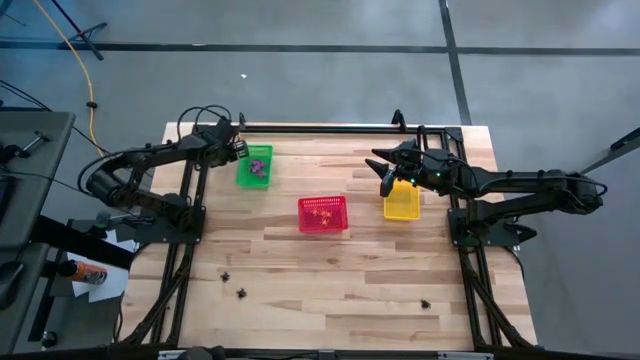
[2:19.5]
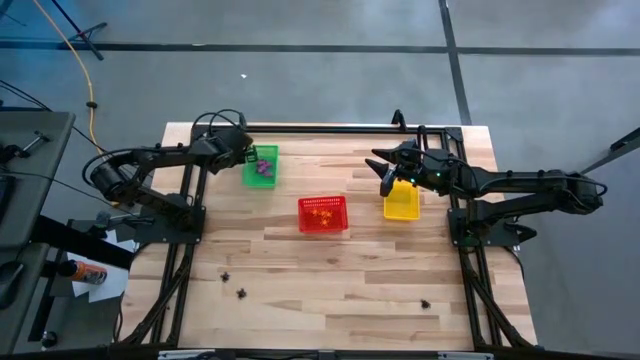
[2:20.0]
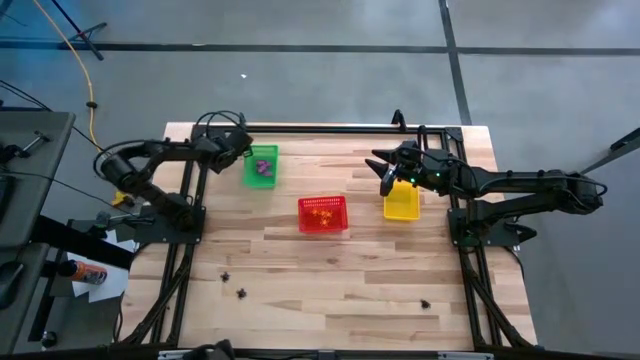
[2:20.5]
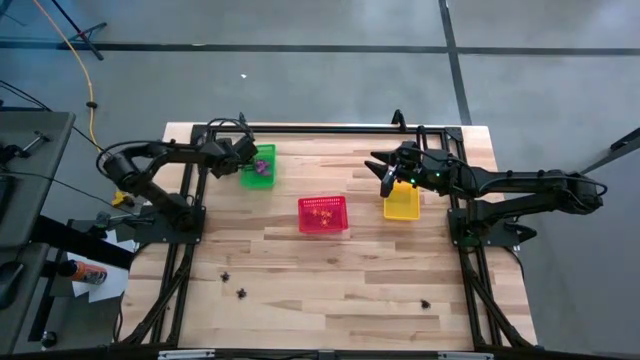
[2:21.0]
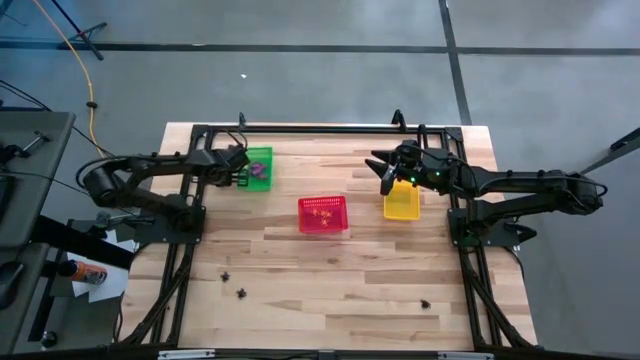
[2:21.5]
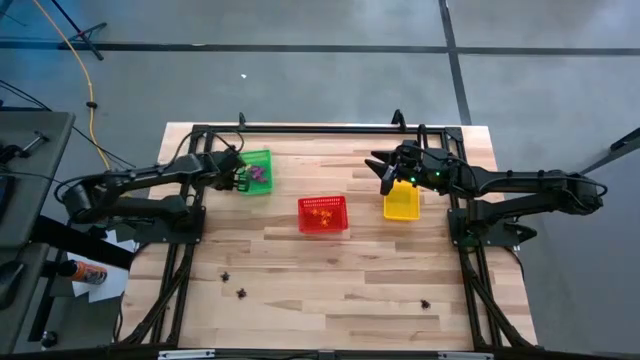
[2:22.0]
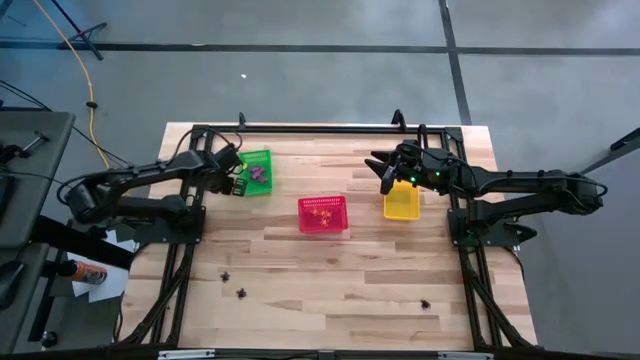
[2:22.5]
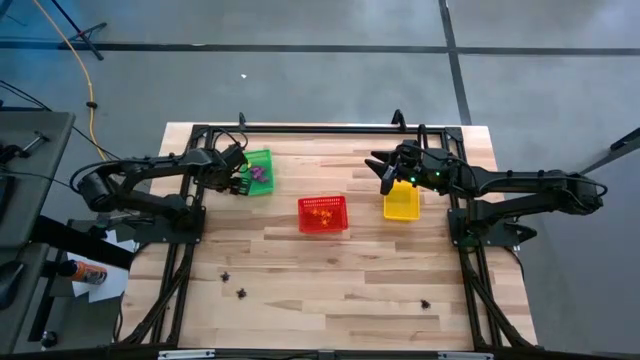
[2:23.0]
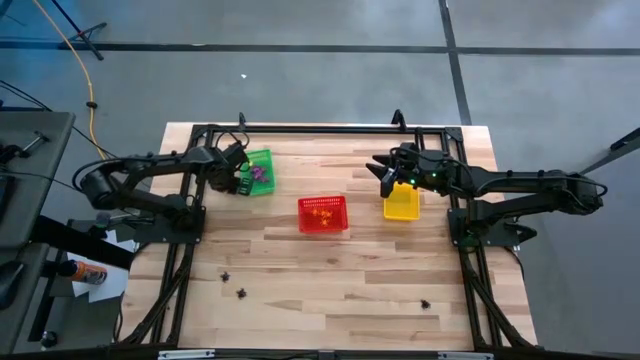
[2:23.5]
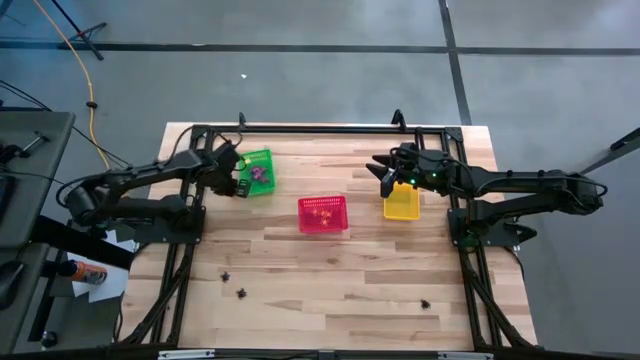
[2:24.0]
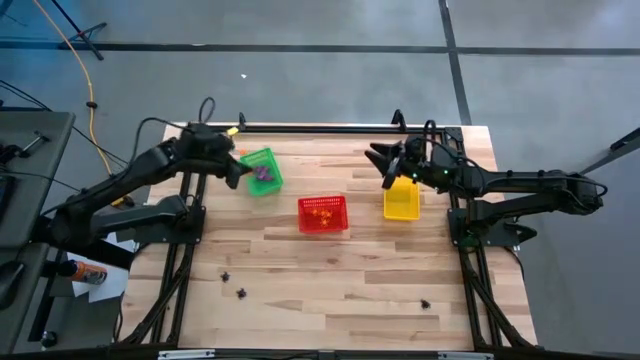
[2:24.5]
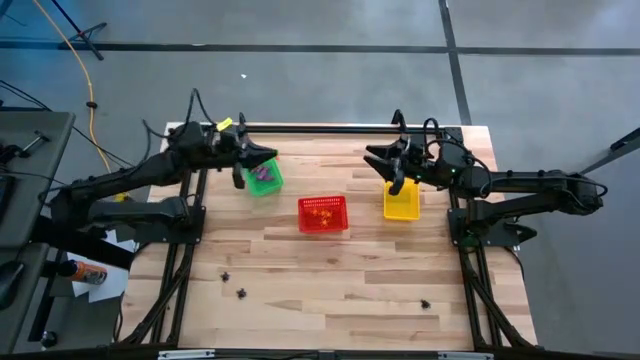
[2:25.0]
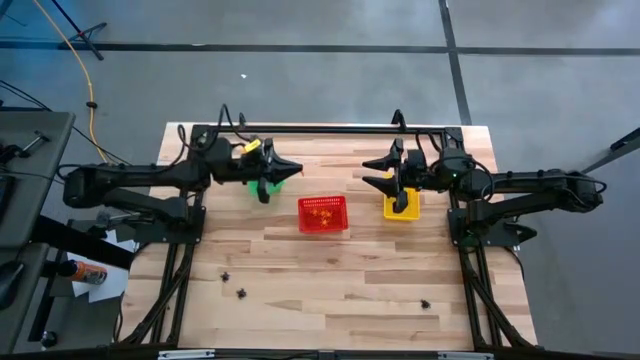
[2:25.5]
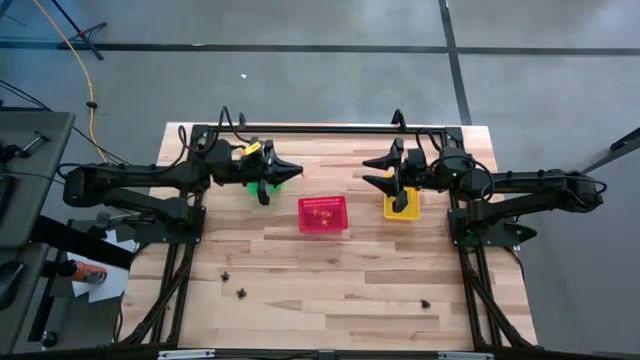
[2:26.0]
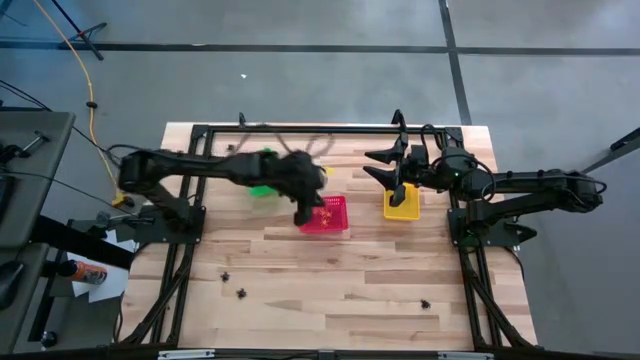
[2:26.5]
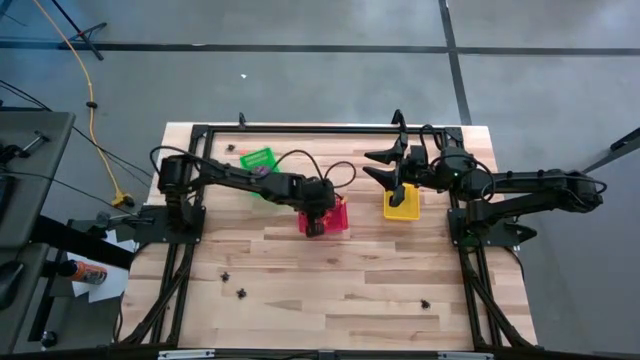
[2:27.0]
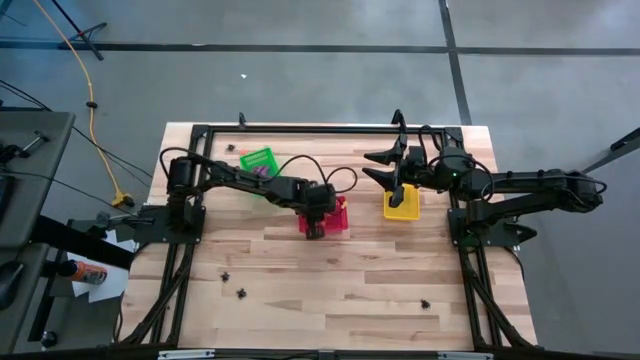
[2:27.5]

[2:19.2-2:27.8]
Task: Sort Halloween decoration
Put the orange spider toy into the red bin

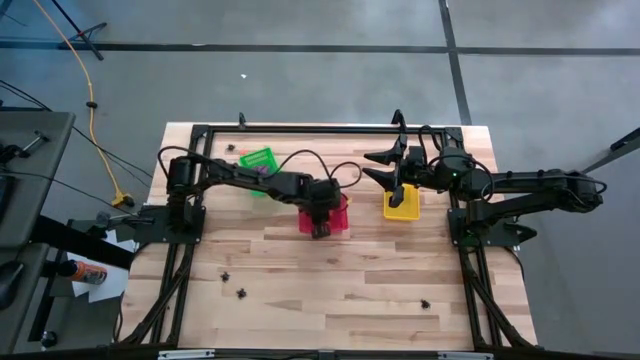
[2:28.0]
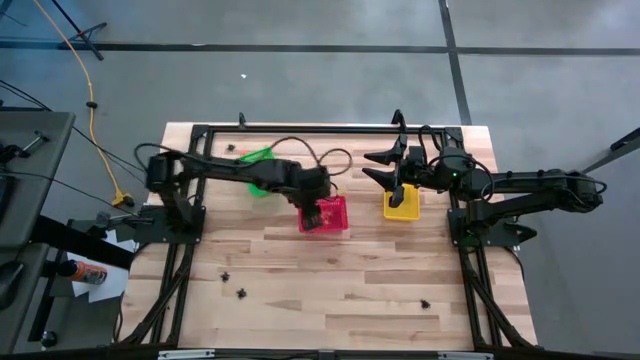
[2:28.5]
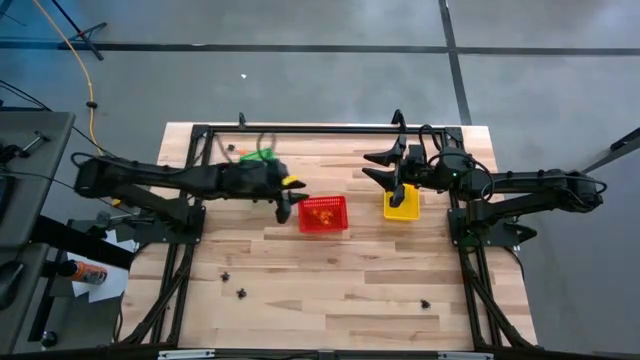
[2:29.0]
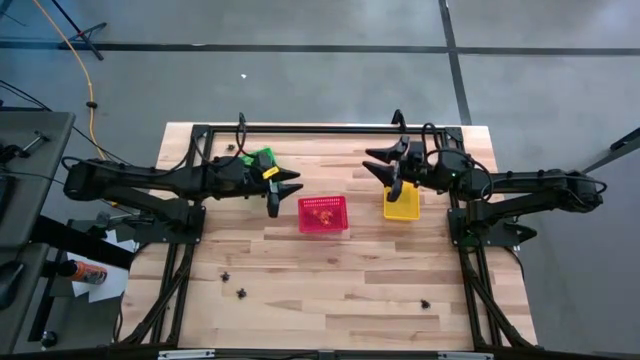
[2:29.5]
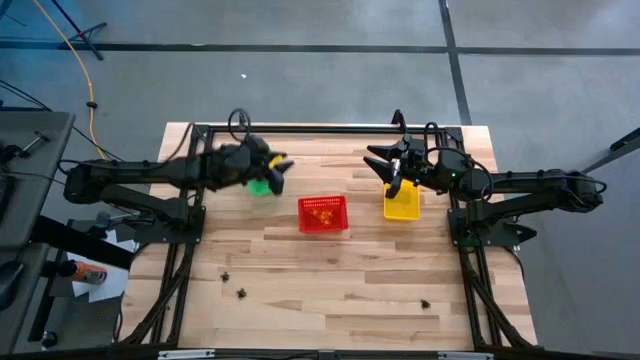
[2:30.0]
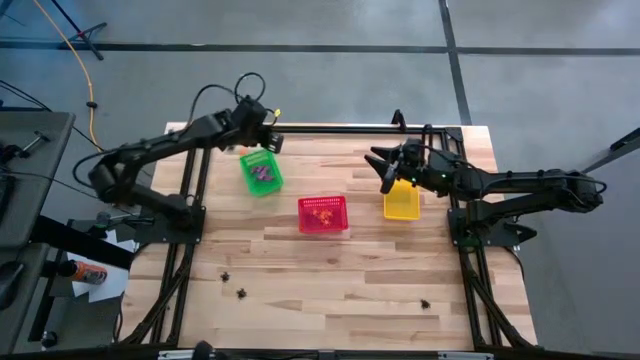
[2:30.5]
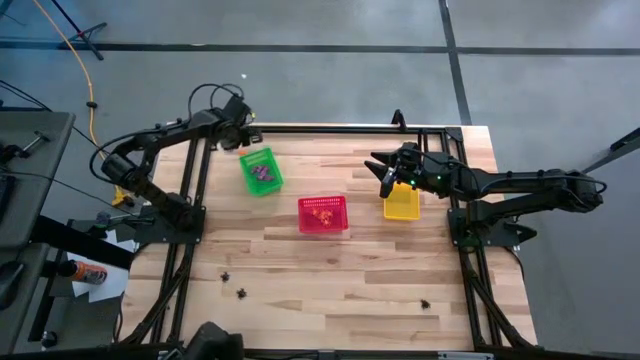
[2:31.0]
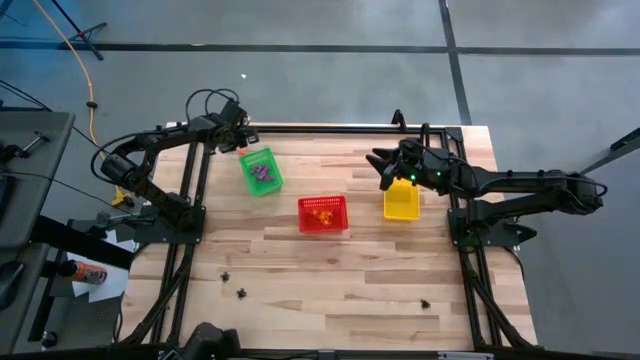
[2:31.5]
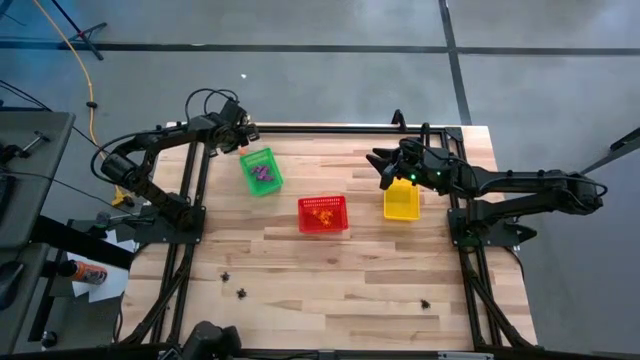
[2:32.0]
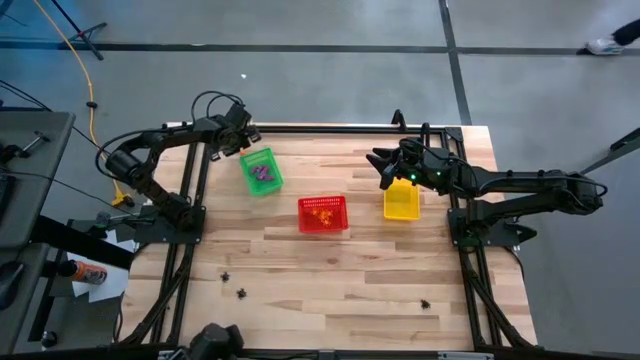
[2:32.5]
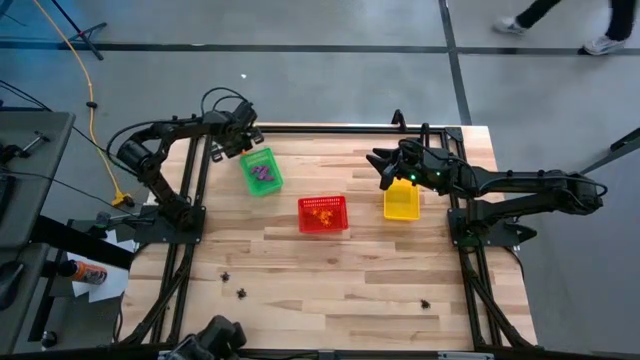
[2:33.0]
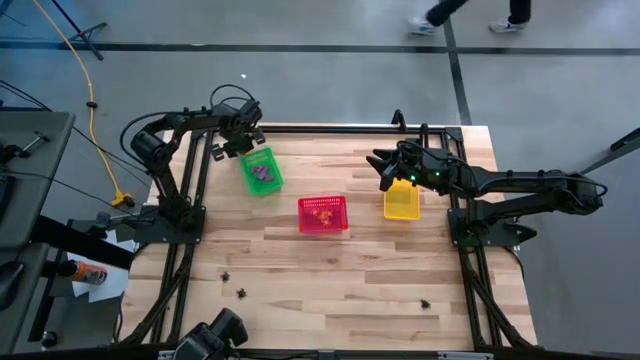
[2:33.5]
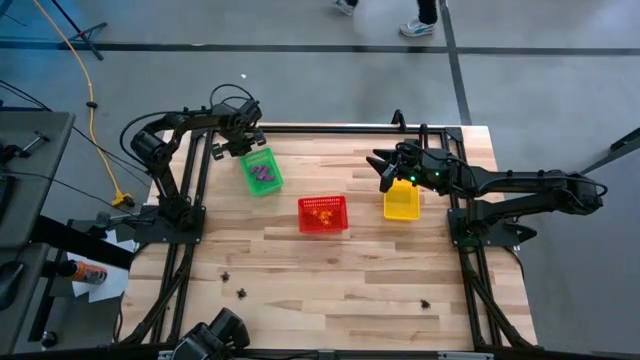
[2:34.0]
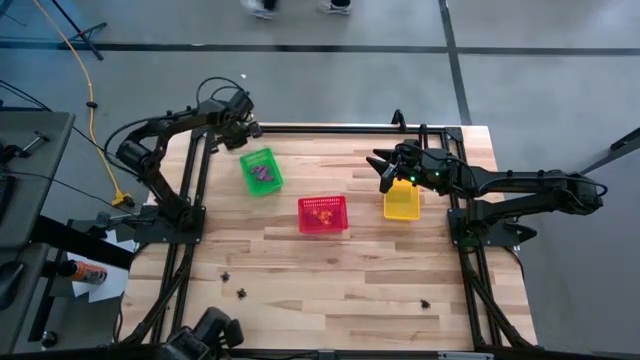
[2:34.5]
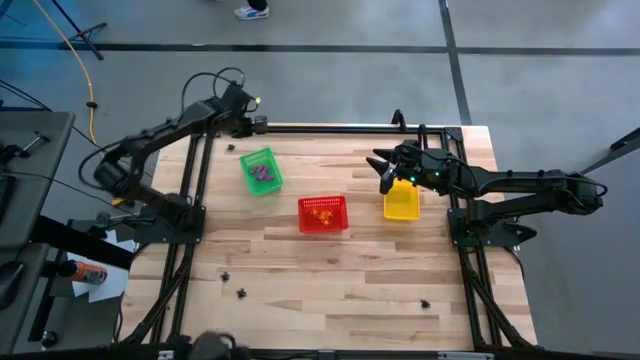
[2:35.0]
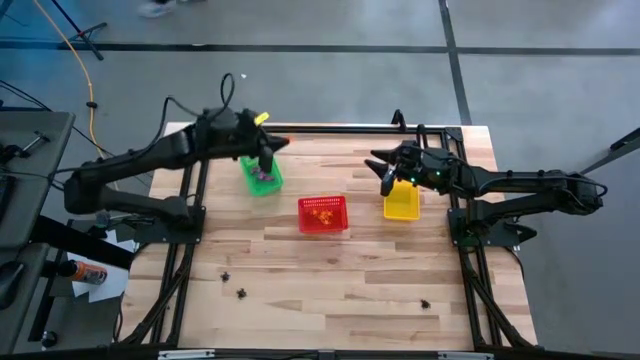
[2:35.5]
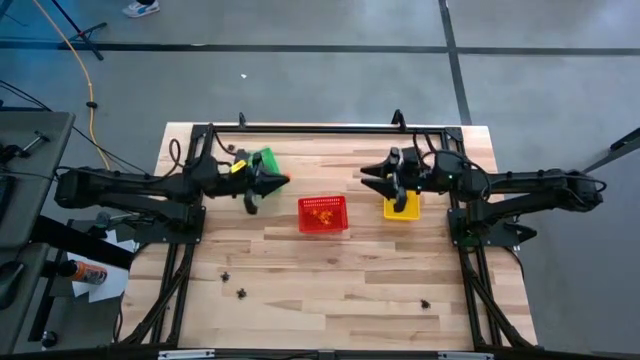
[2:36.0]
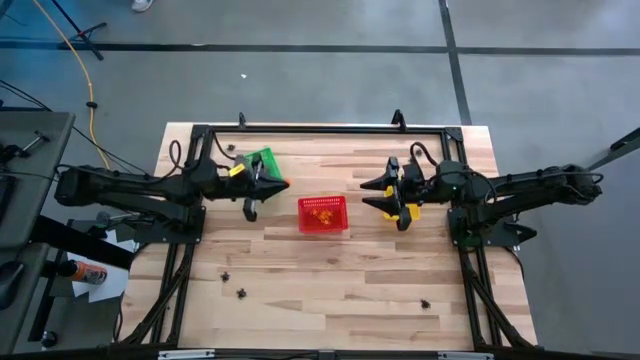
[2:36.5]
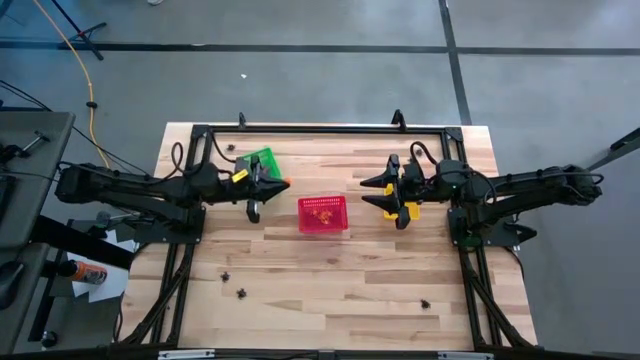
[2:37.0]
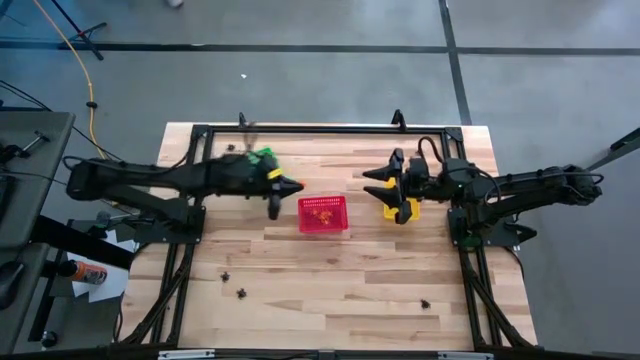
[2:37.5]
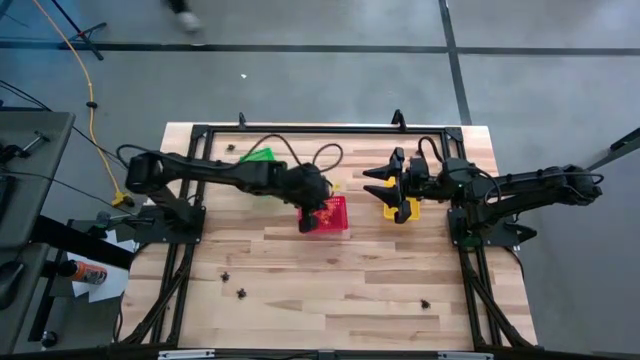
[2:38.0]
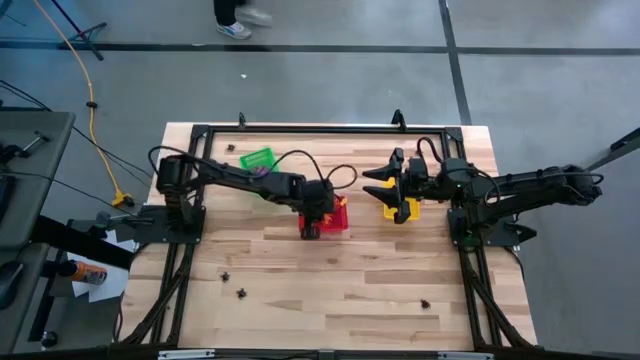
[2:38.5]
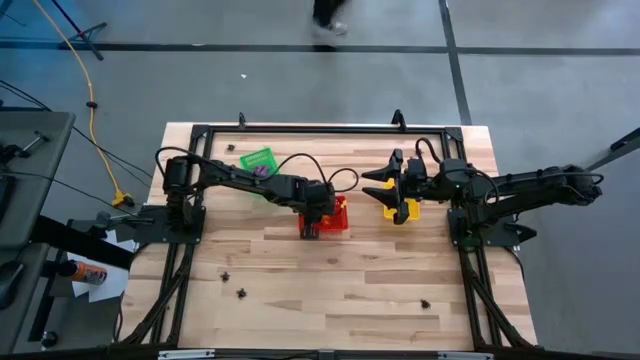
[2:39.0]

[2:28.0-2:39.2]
Put the orange spider toy into the red bin

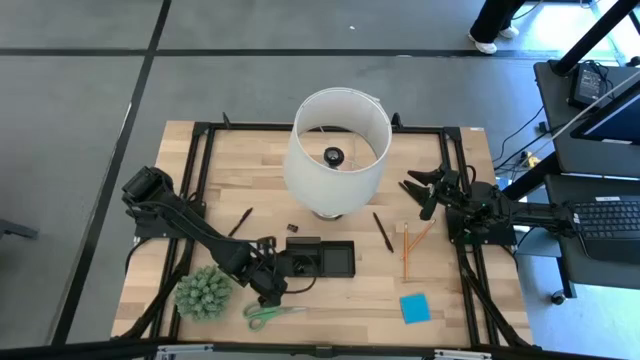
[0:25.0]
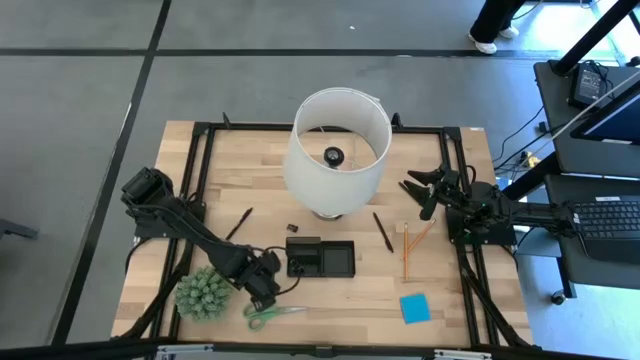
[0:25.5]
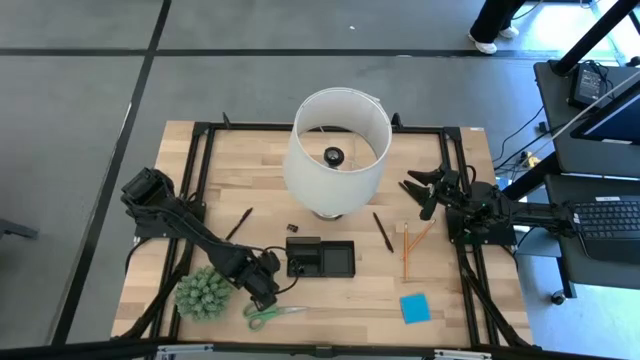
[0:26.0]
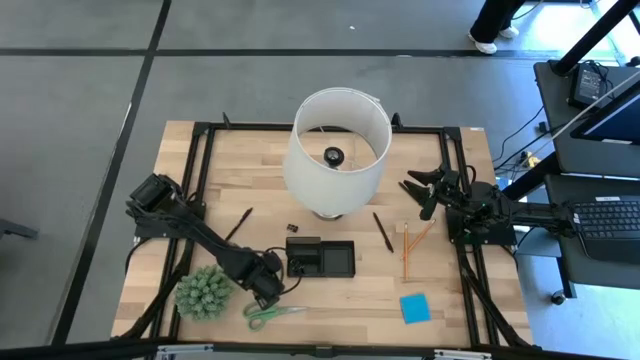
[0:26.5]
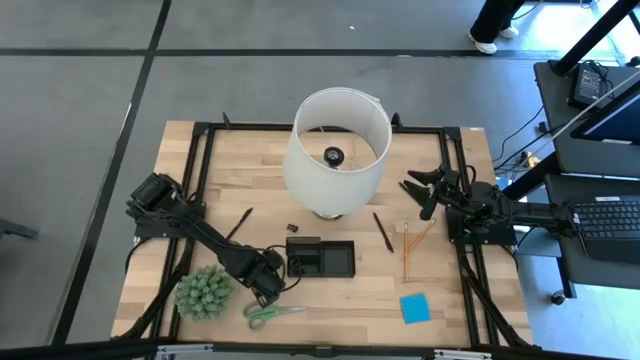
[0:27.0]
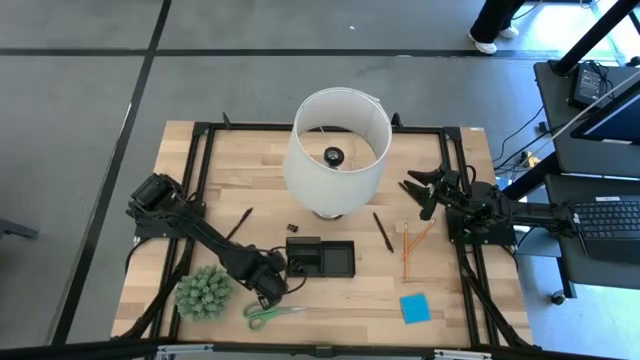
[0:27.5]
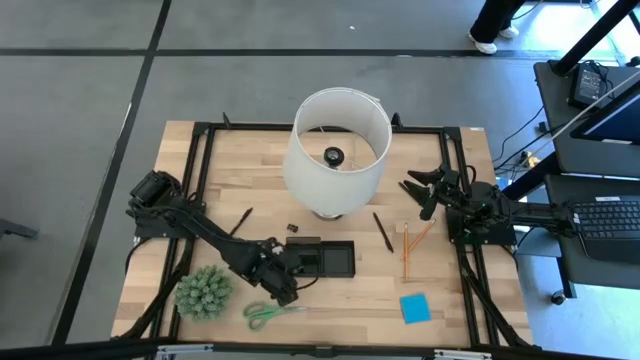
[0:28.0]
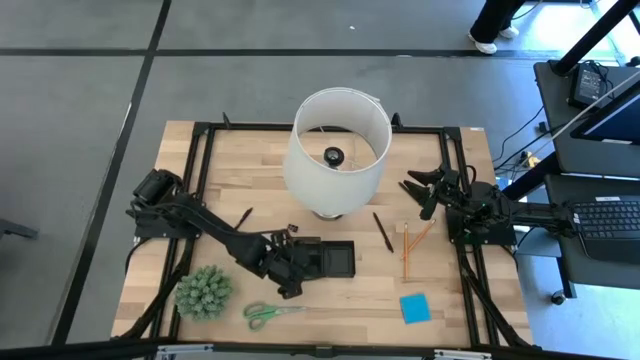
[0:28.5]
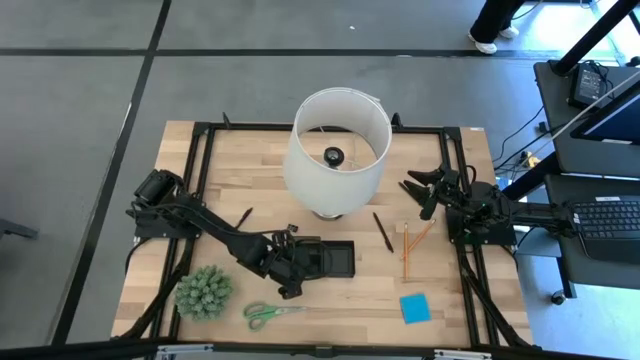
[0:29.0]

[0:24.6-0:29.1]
Task: Pick and place office supplies into organizer
Put the green eraser into the black desk organizer
